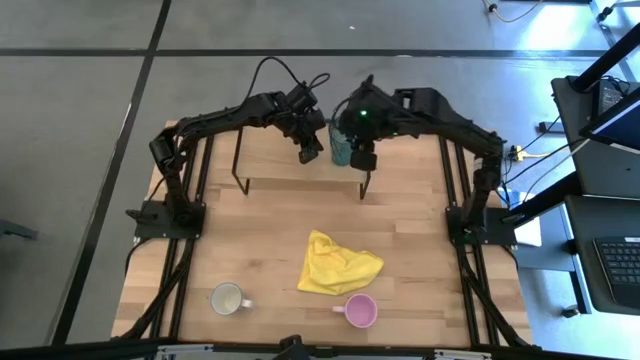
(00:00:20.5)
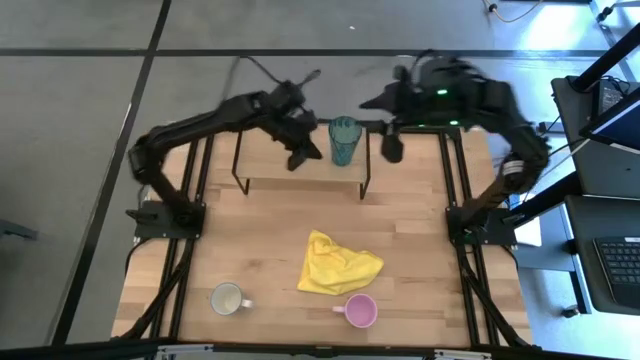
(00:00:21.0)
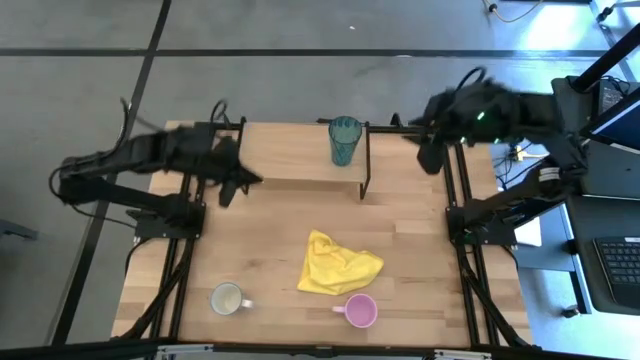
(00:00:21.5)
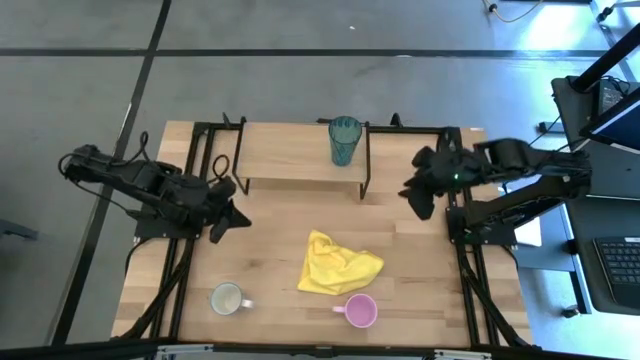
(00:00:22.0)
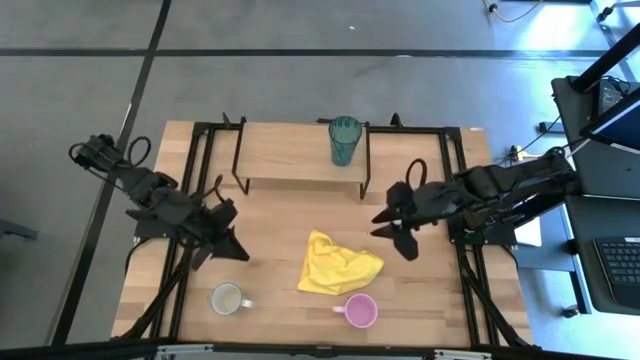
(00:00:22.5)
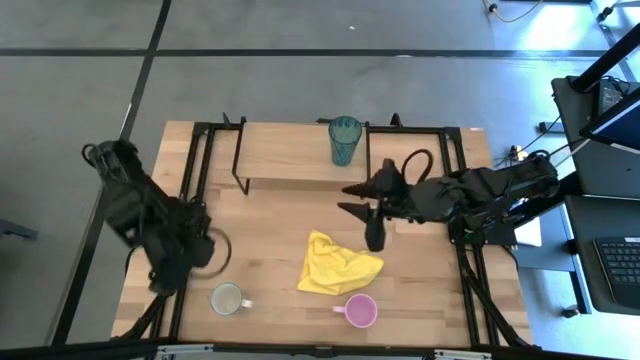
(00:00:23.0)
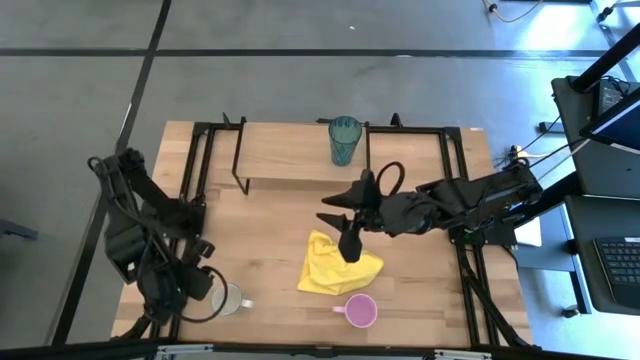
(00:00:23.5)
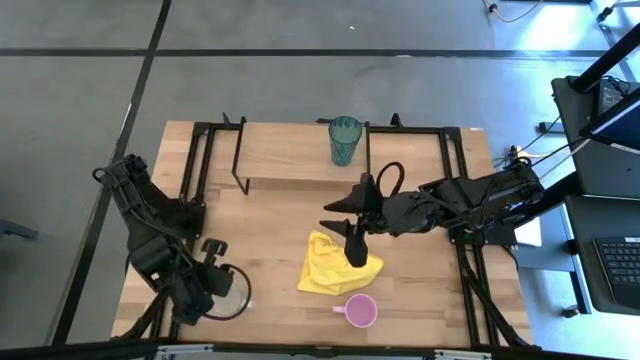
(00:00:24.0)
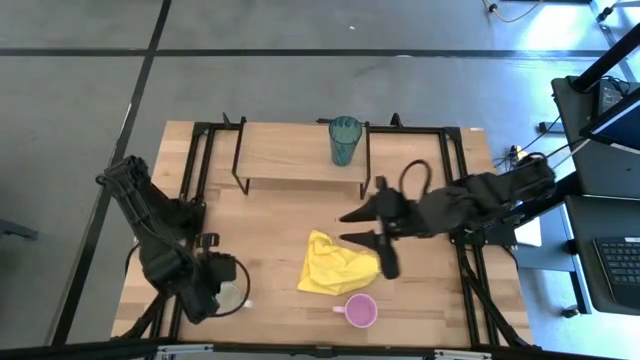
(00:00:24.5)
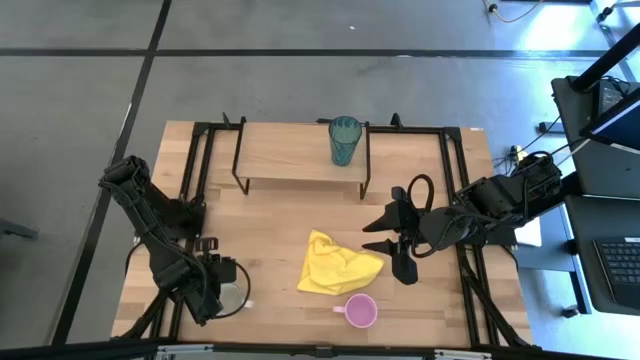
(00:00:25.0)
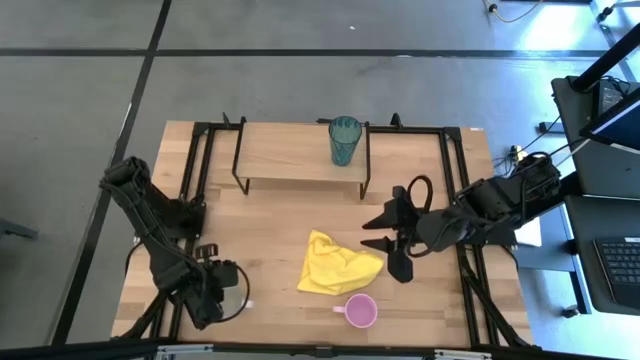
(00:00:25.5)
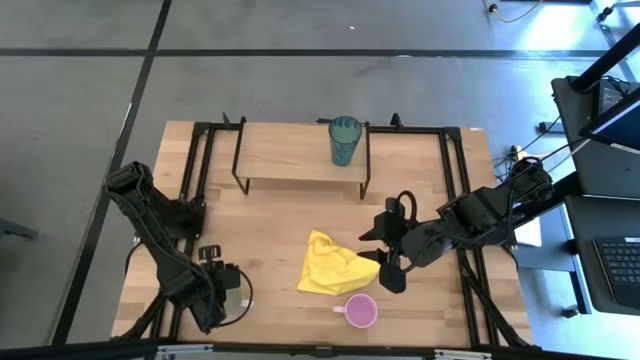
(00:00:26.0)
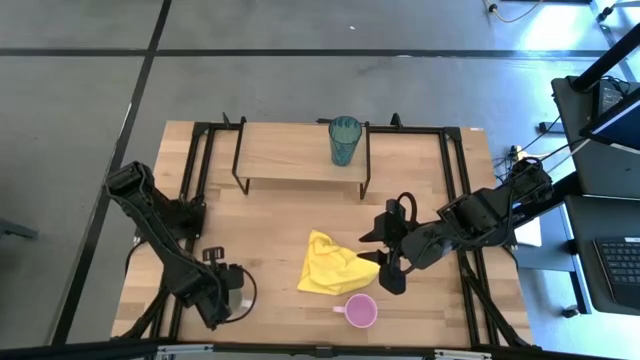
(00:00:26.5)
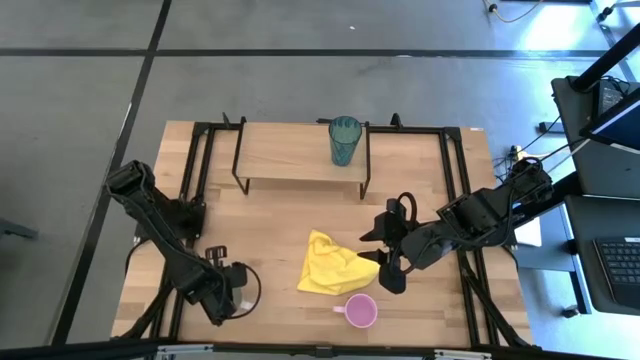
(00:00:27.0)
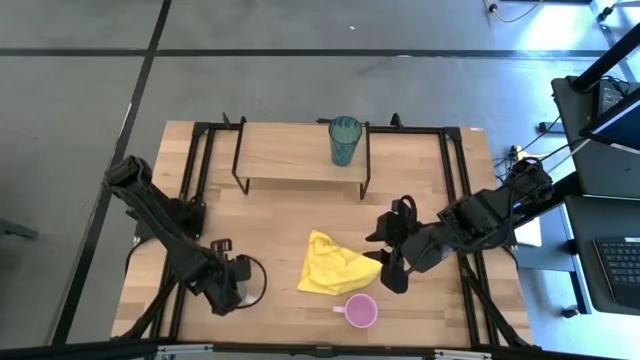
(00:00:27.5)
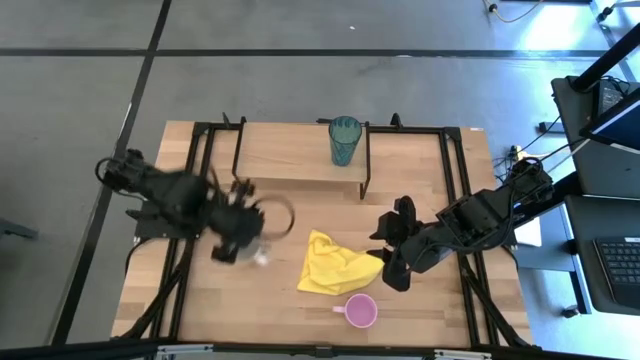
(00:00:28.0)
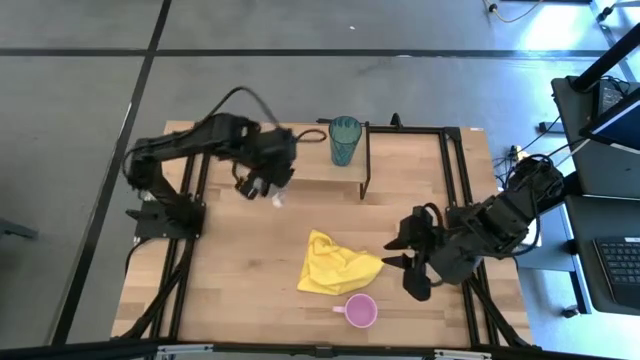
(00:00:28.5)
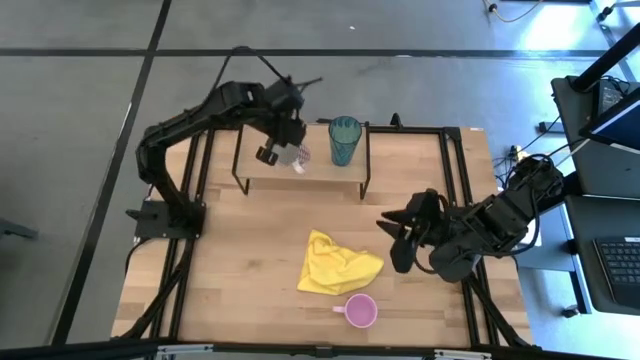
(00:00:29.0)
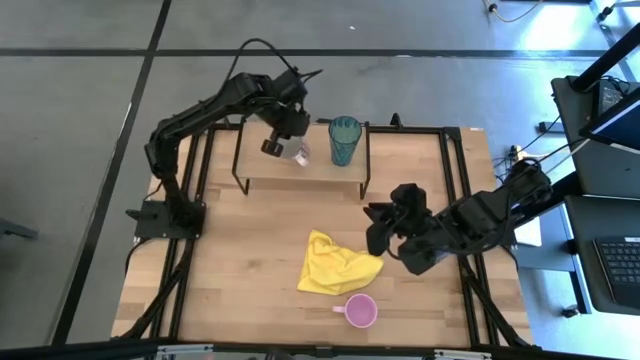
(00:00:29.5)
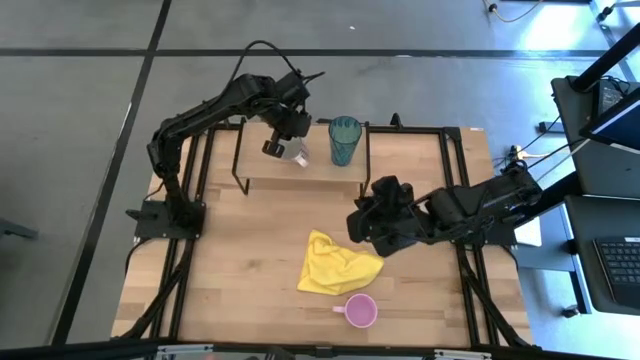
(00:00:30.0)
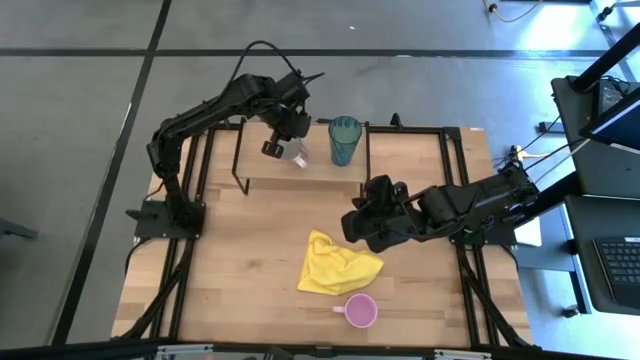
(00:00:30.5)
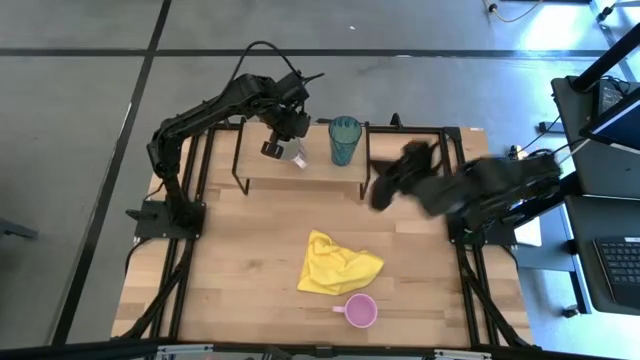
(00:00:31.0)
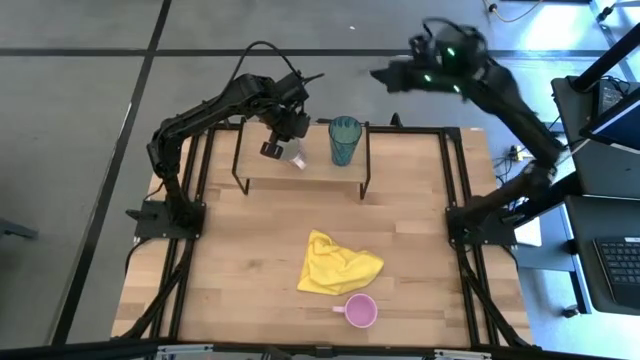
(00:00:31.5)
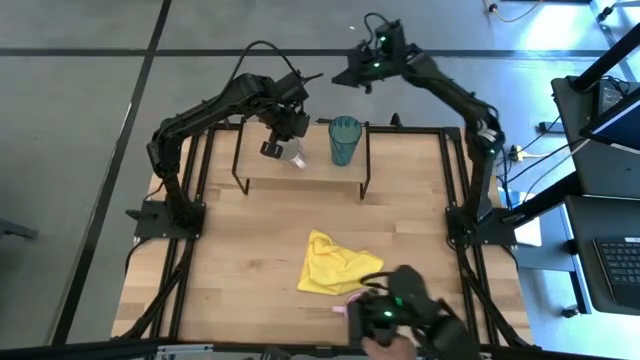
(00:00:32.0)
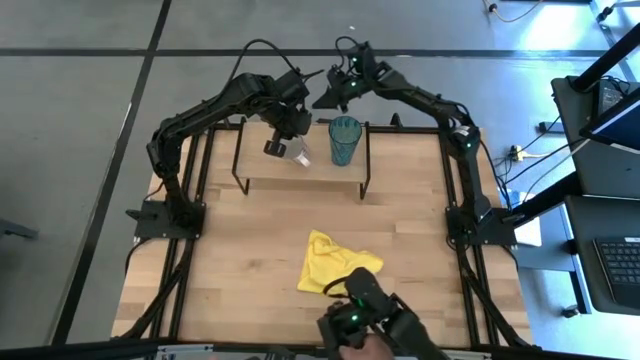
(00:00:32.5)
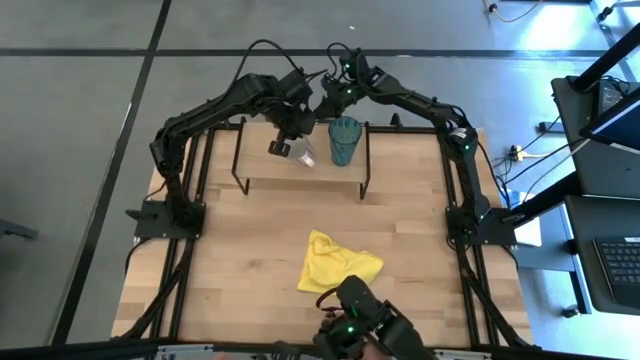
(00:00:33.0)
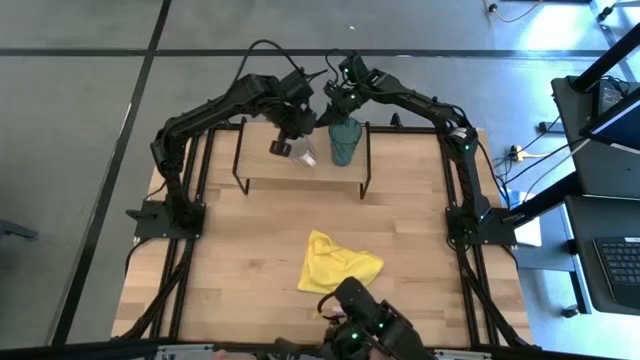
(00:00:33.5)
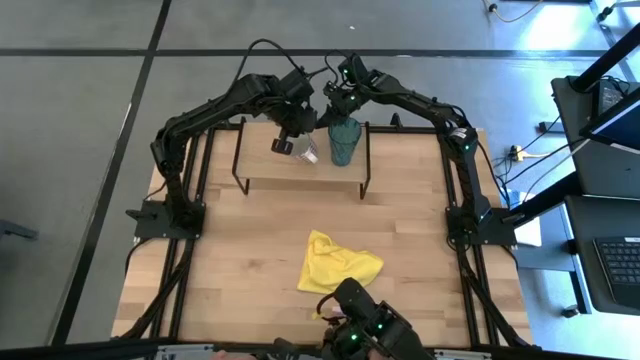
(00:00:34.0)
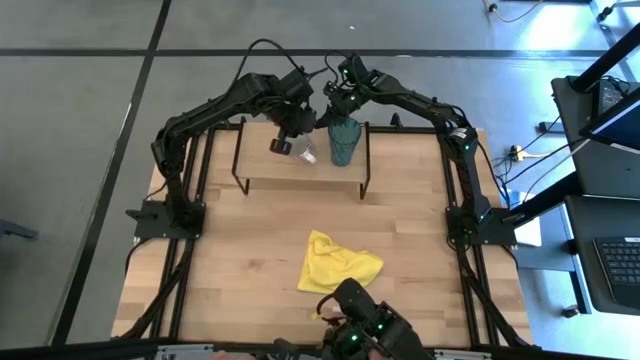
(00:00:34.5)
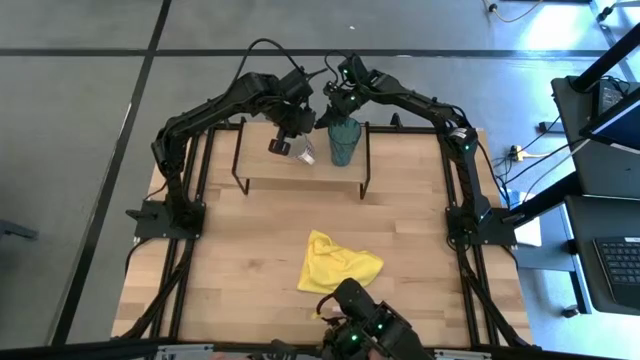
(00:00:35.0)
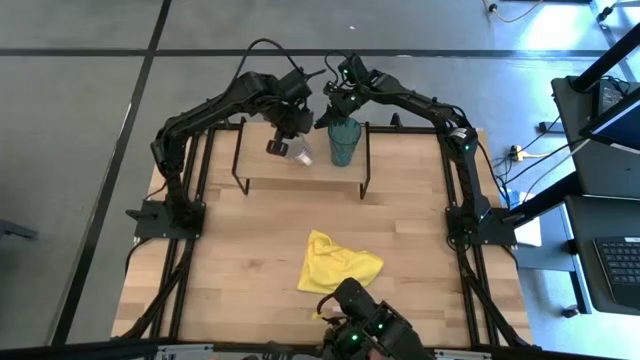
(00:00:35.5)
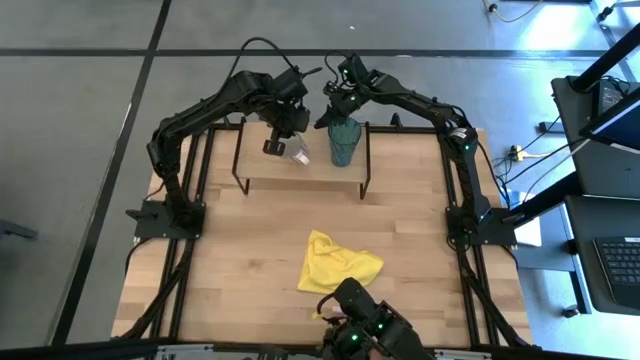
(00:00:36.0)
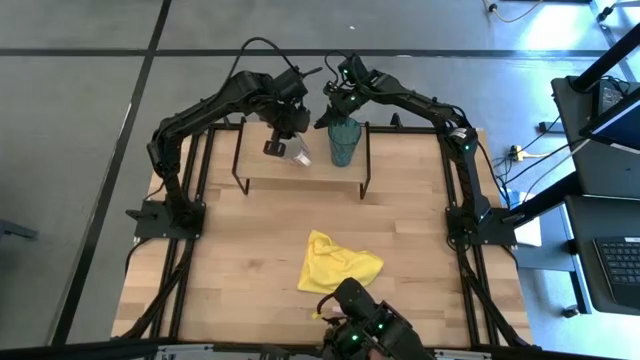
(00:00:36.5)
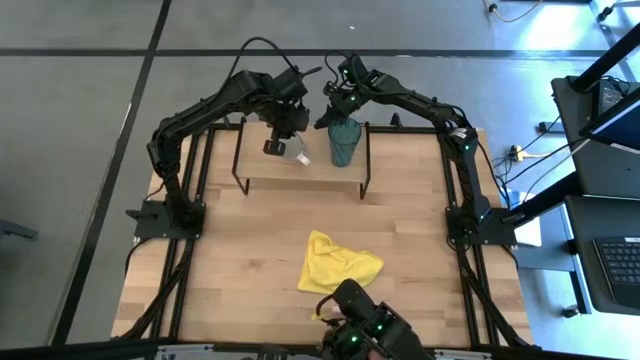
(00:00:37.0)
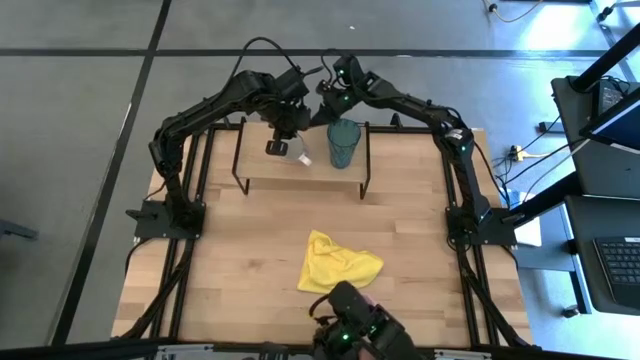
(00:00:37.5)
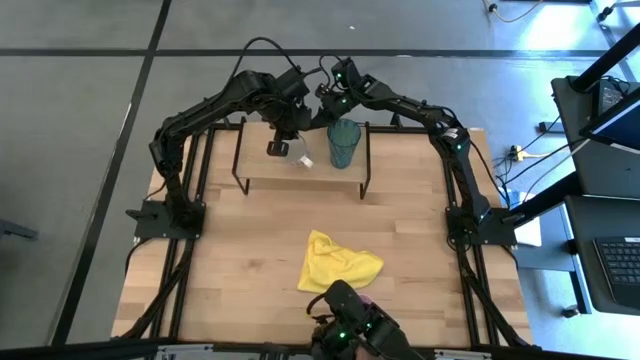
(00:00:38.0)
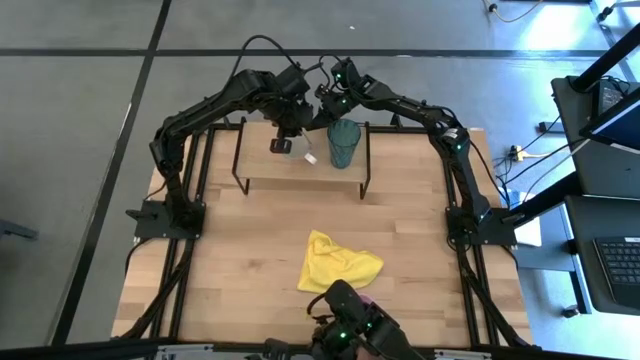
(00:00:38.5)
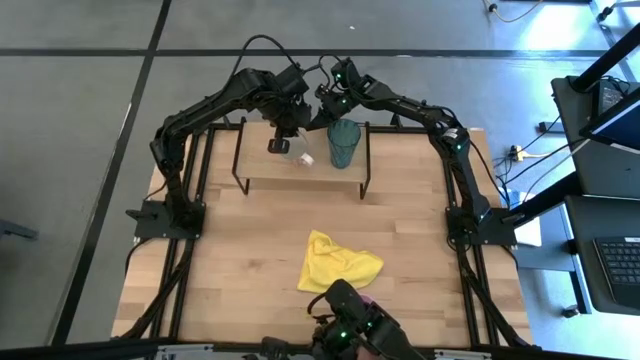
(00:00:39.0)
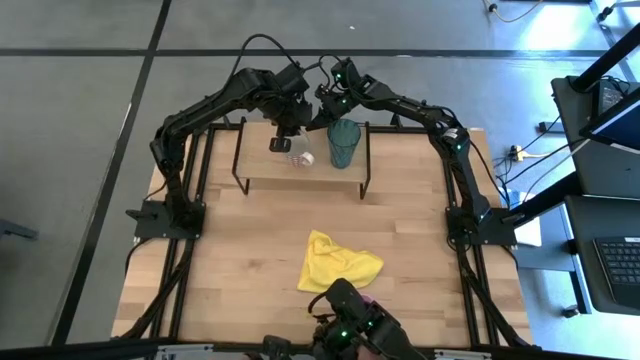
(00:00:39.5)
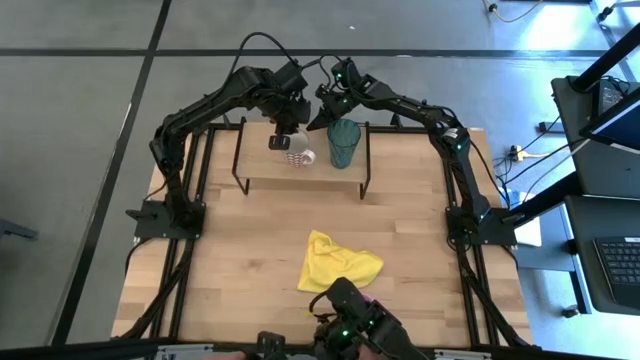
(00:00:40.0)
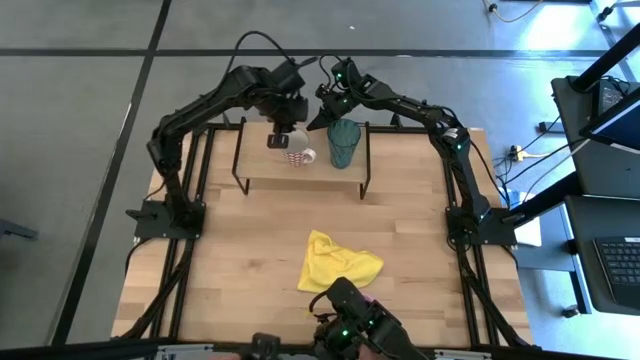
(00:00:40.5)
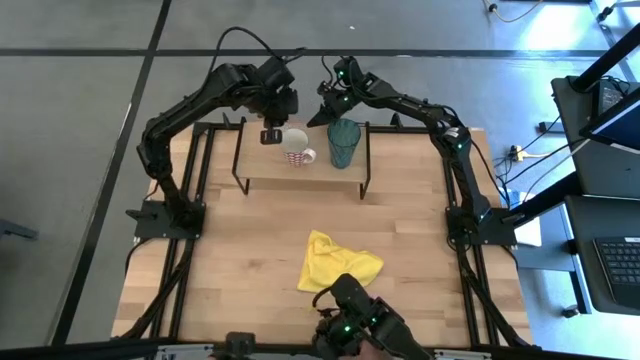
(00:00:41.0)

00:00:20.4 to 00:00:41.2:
Task: Stack small to large cups/mugs on shelf
Put the red patterned mug on the shelf
